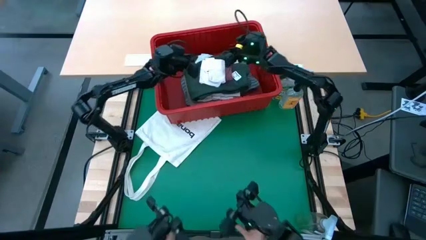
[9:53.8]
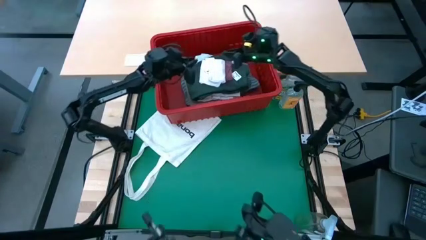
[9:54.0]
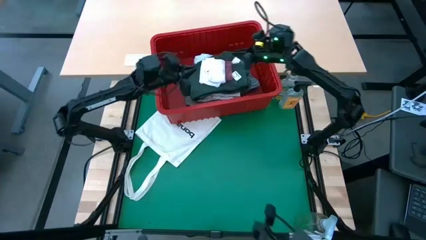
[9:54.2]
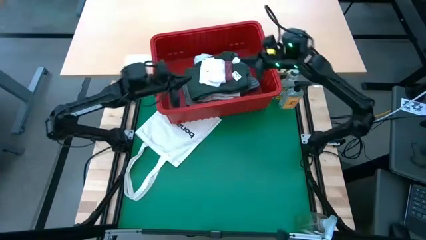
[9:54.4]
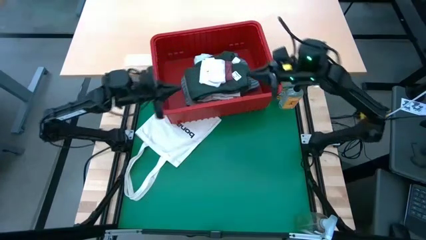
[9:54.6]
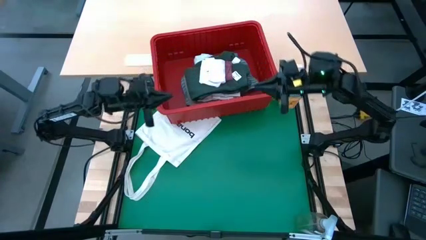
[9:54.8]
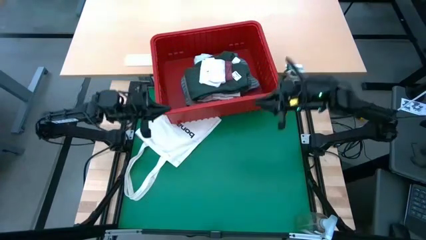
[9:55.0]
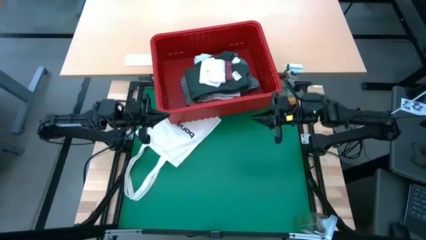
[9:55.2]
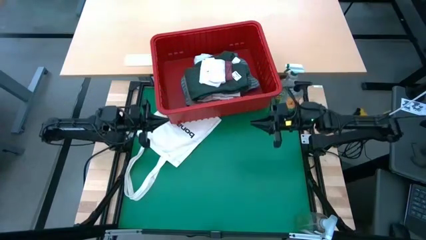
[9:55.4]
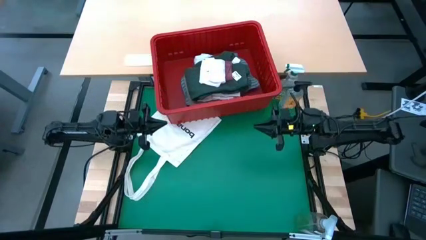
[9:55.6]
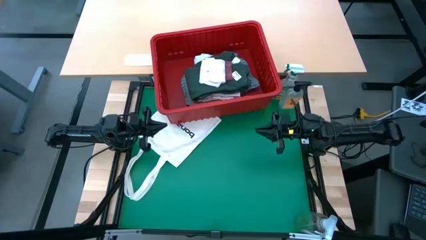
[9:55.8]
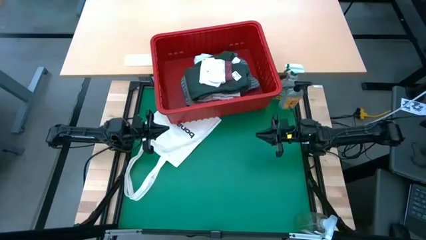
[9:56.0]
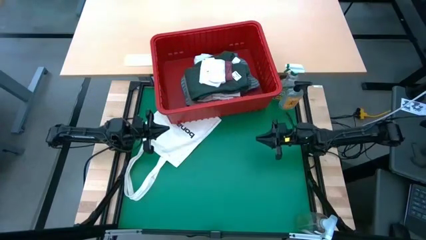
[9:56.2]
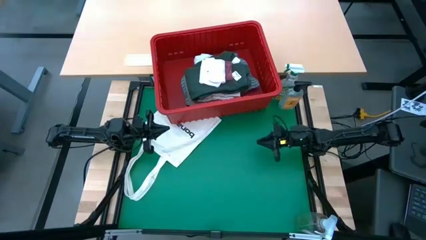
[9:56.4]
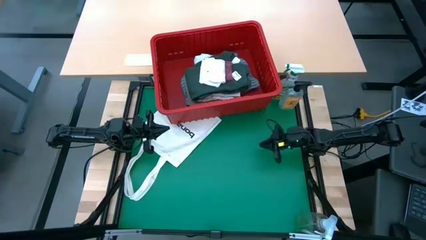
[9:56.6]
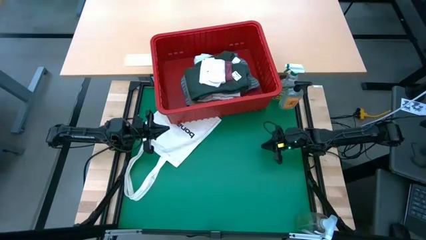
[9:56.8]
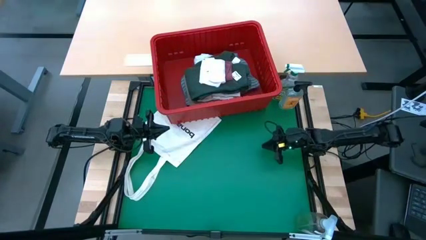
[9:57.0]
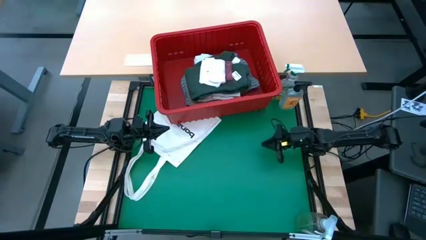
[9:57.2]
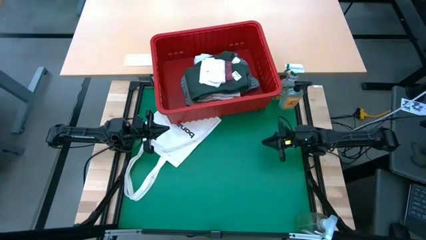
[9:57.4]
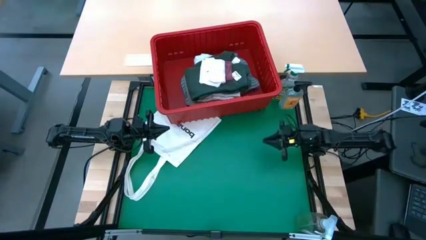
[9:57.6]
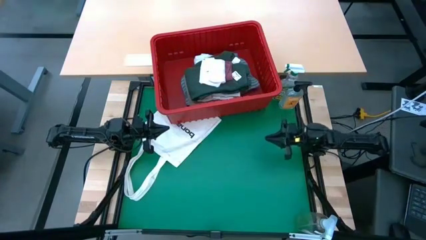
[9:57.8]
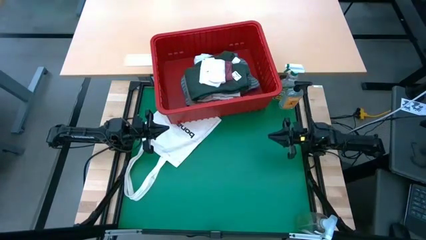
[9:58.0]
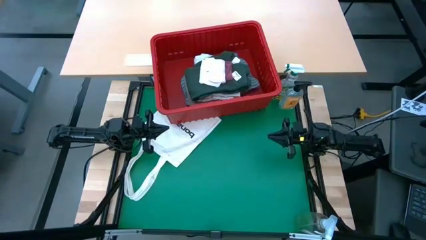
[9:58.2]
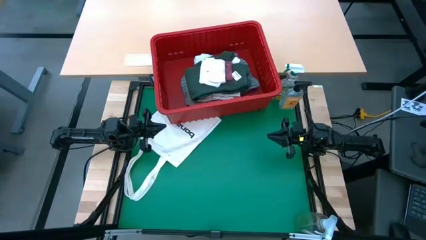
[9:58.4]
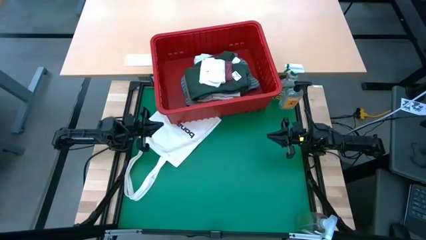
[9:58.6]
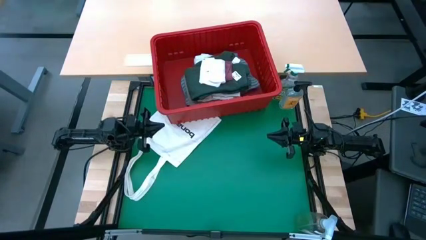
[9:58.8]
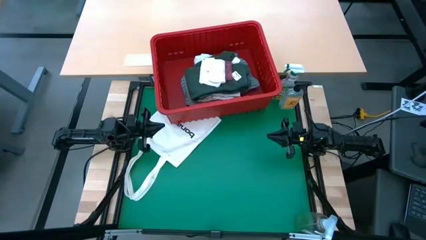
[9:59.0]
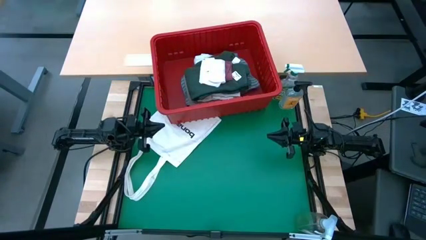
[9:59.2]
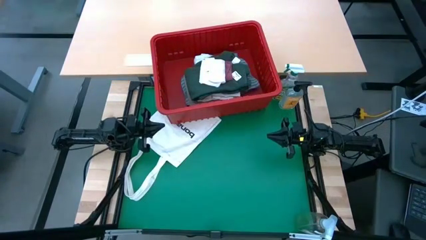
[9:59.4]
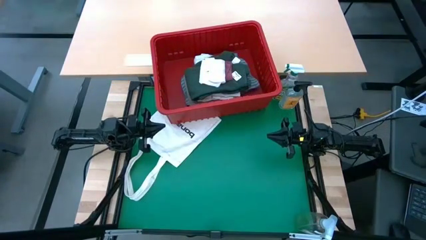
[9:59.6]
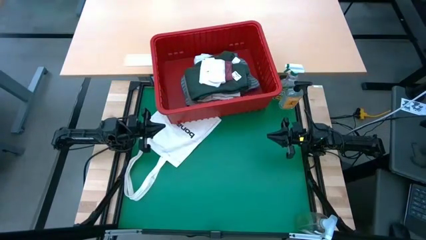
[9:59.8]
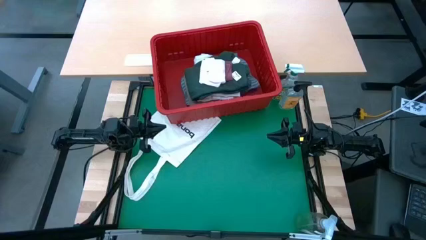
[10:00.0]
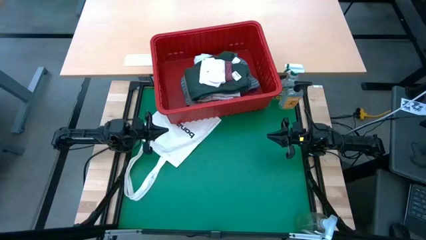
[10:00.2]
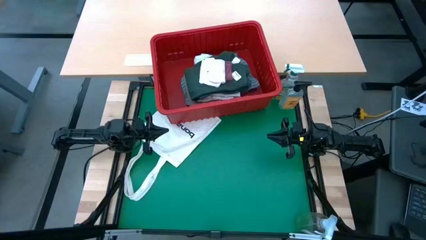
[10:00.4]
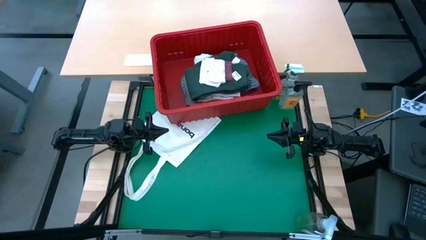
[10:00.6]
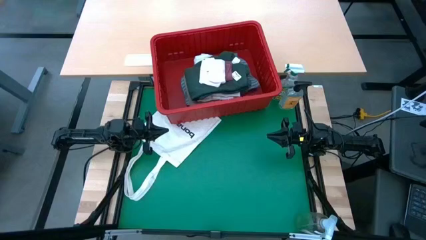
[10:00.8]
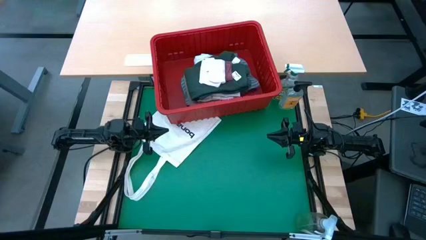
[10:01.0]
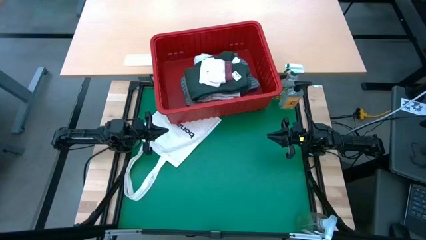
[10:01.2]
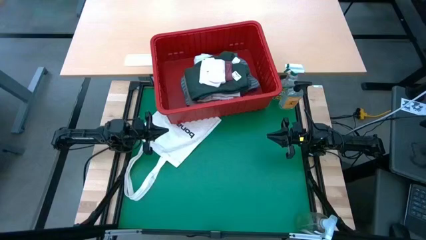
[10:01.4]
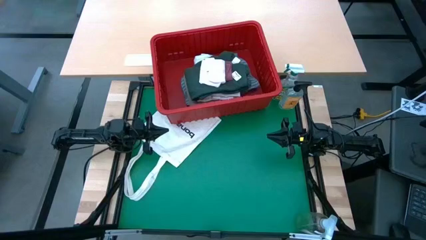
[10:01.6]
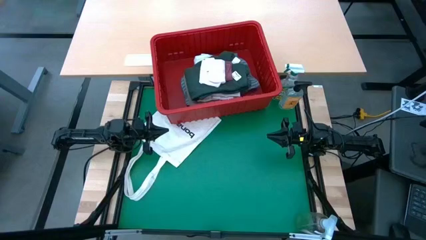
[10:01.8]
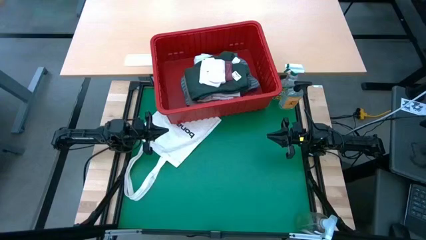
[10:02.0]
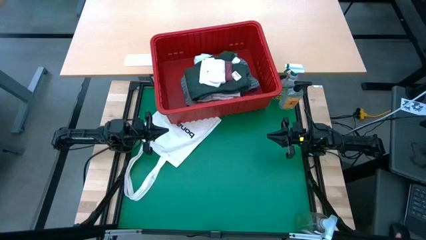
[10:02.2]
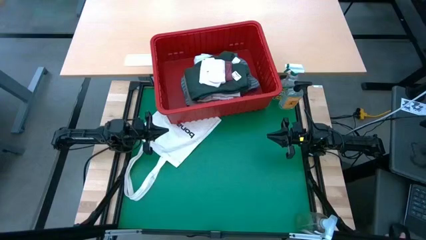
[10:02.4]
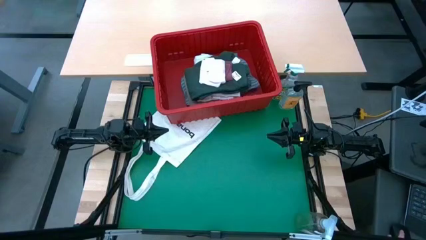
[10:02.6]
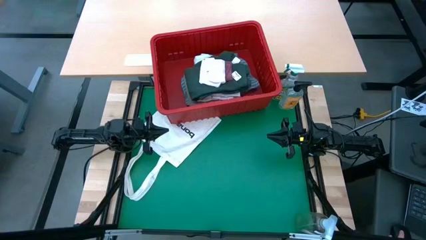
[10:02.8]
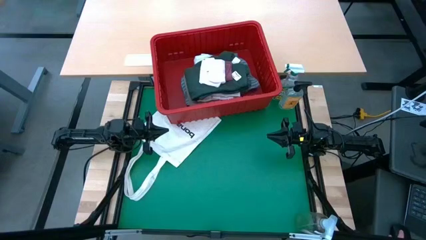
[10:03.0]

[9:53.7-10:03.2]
Task: Fold Laundry from Bin
Return to Home Position
